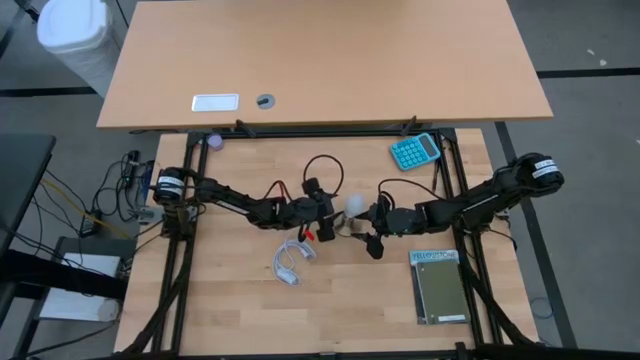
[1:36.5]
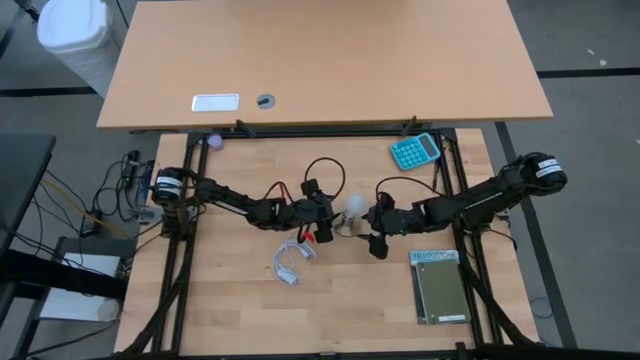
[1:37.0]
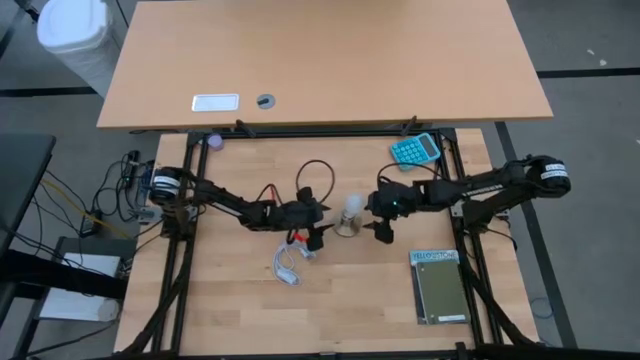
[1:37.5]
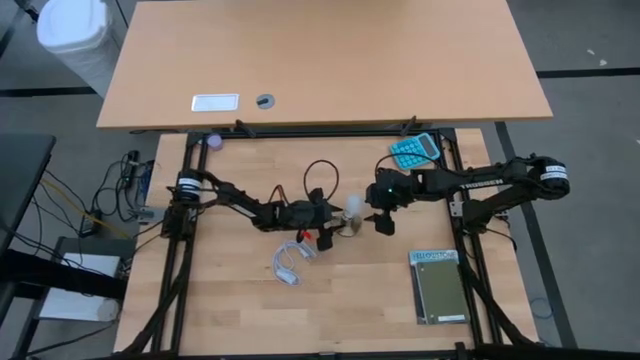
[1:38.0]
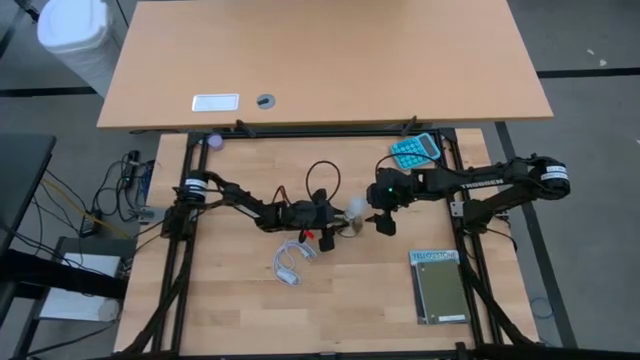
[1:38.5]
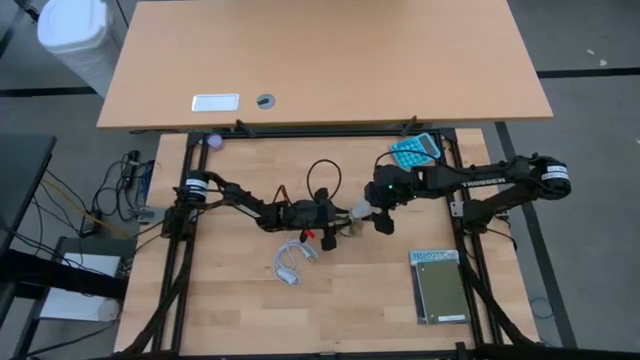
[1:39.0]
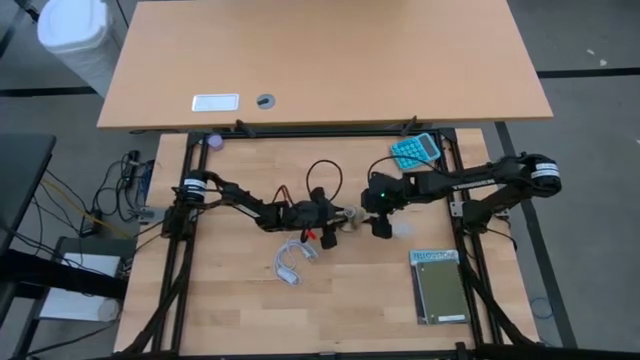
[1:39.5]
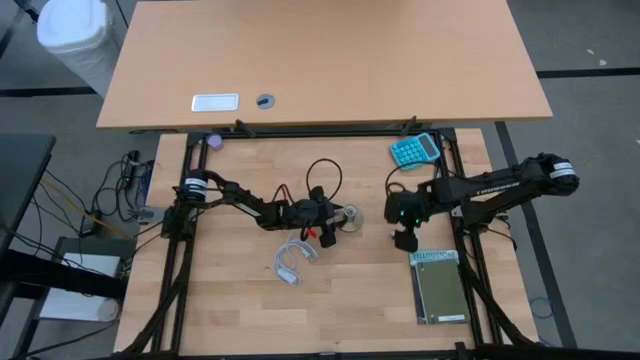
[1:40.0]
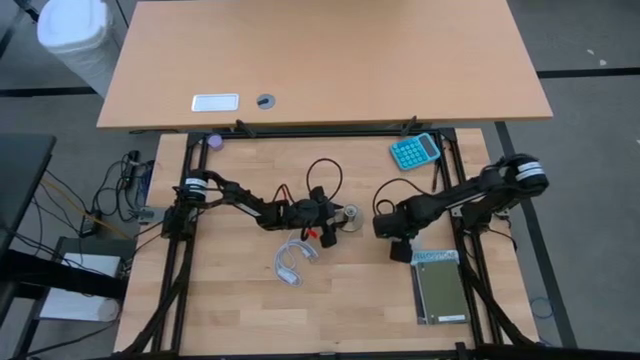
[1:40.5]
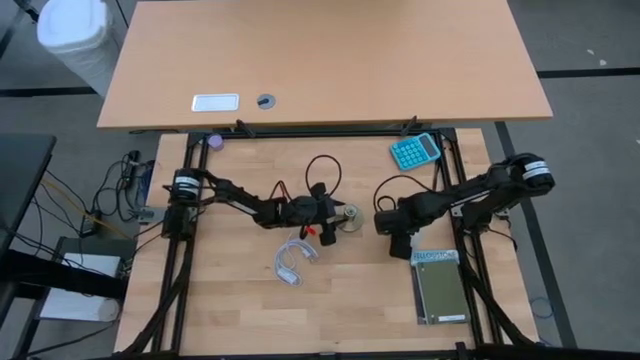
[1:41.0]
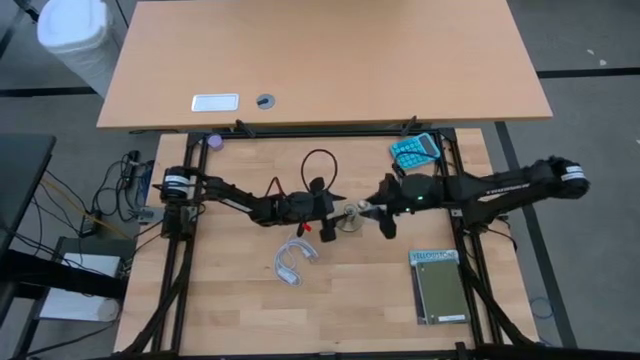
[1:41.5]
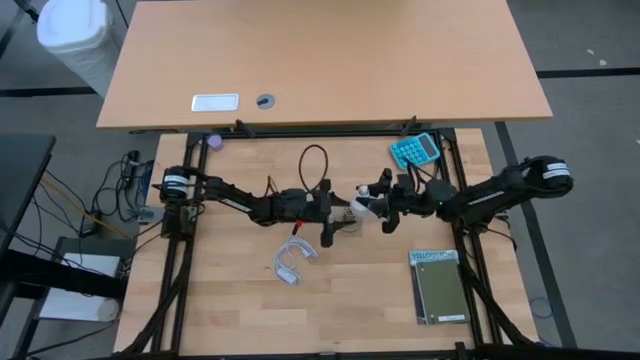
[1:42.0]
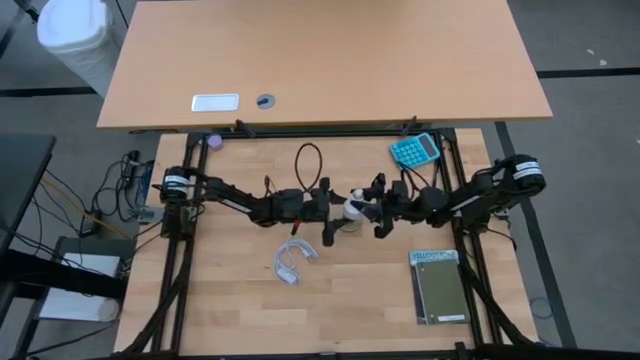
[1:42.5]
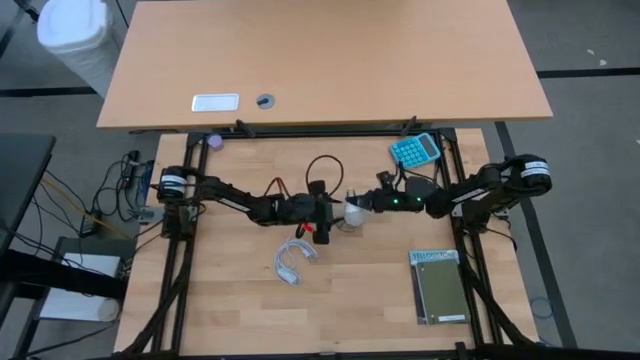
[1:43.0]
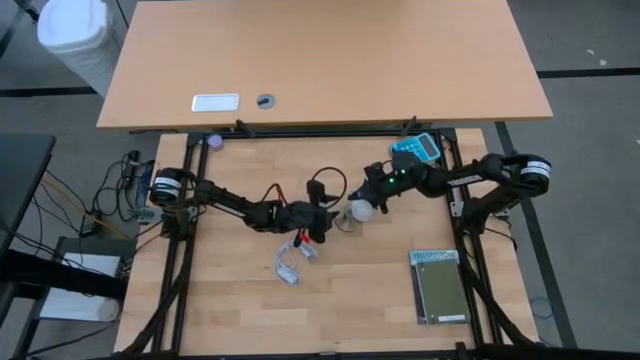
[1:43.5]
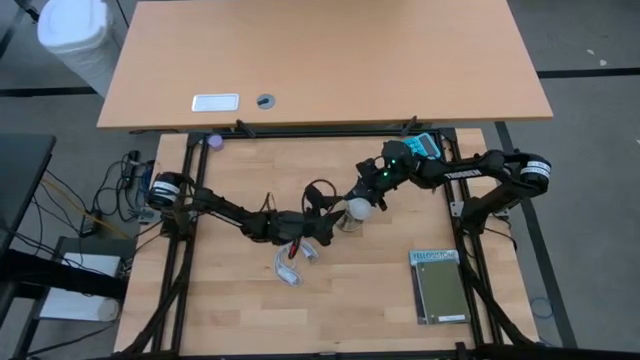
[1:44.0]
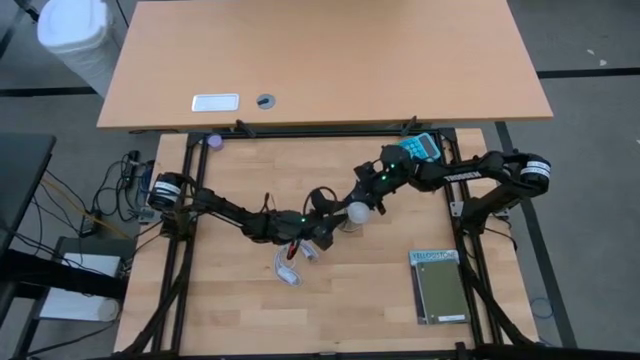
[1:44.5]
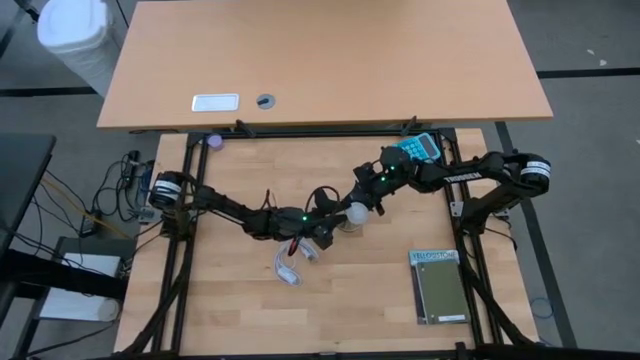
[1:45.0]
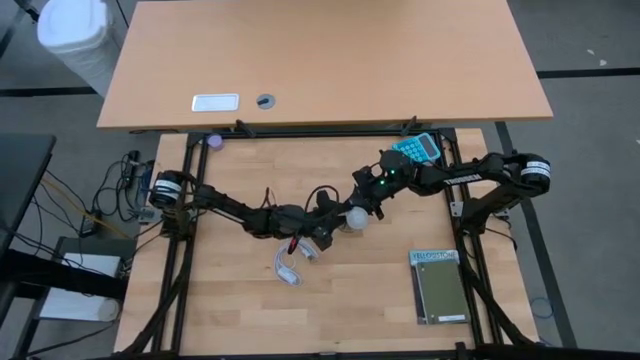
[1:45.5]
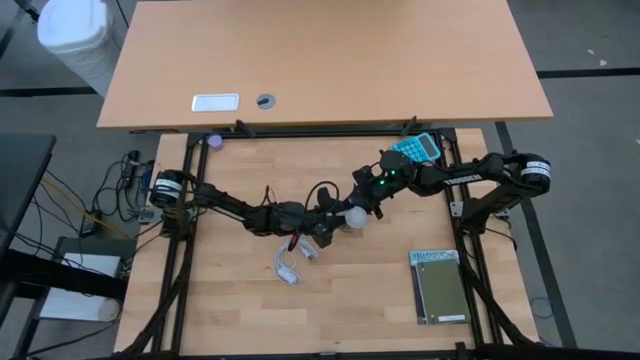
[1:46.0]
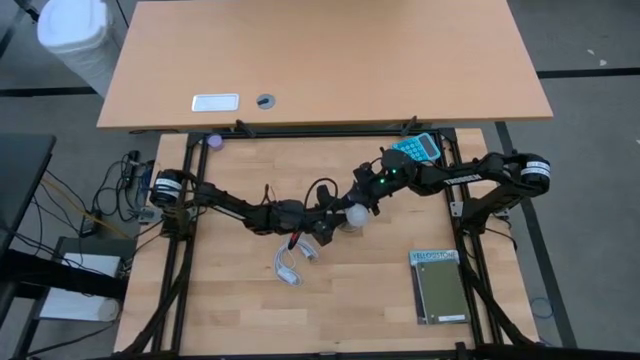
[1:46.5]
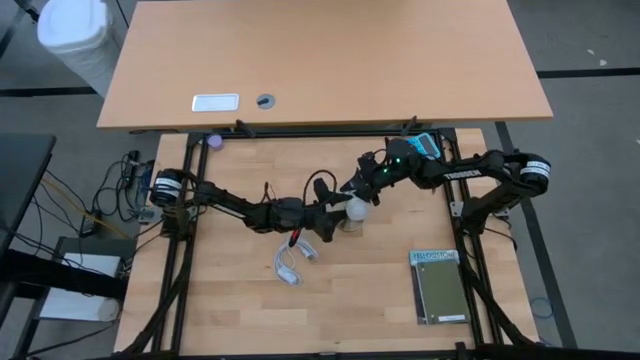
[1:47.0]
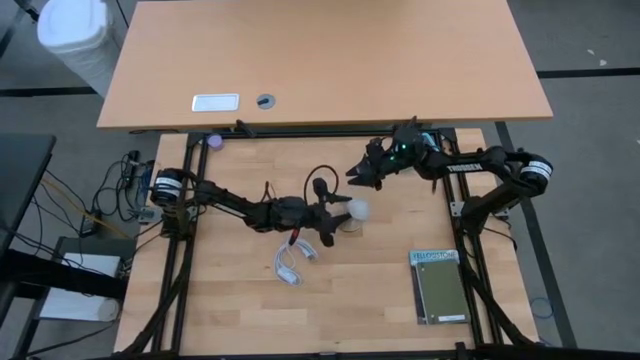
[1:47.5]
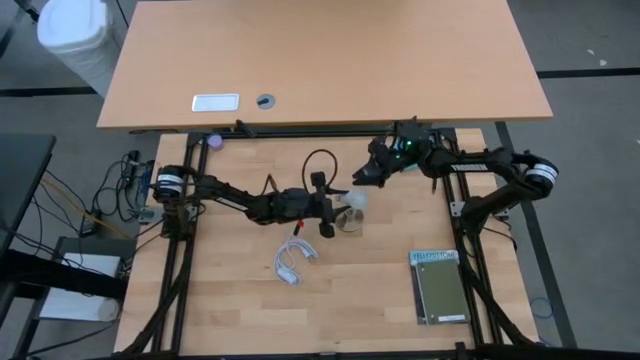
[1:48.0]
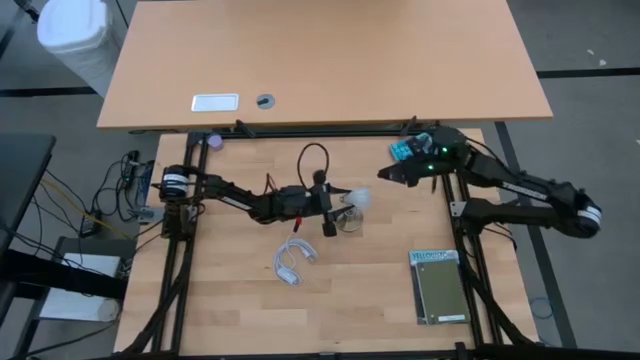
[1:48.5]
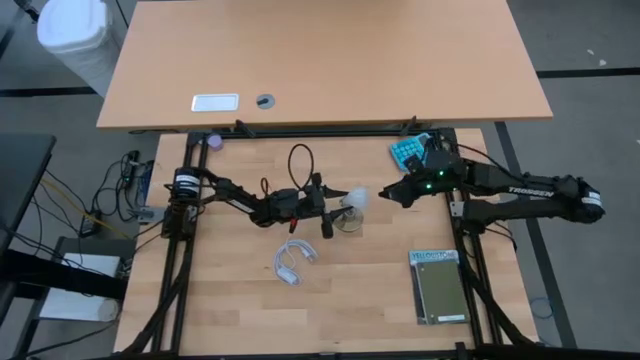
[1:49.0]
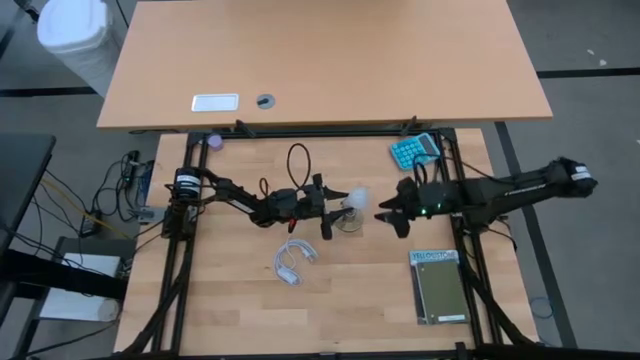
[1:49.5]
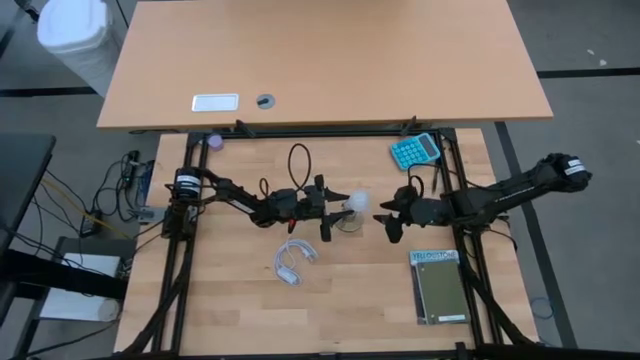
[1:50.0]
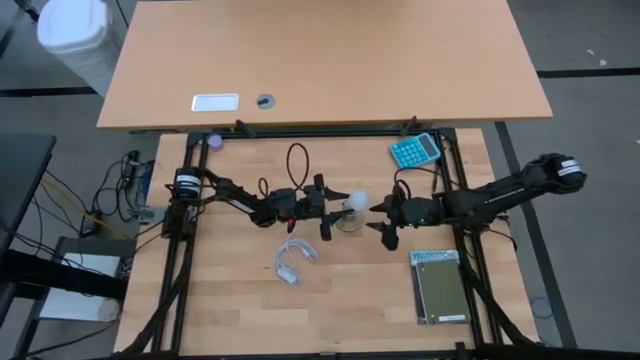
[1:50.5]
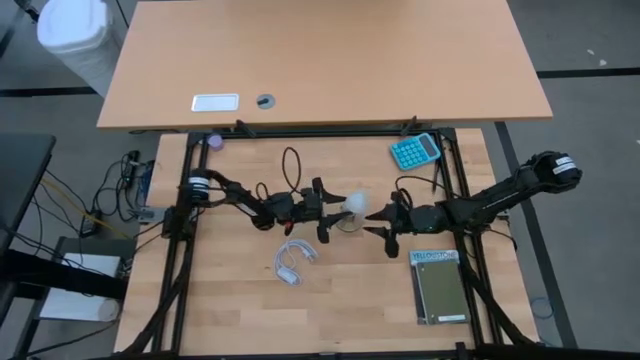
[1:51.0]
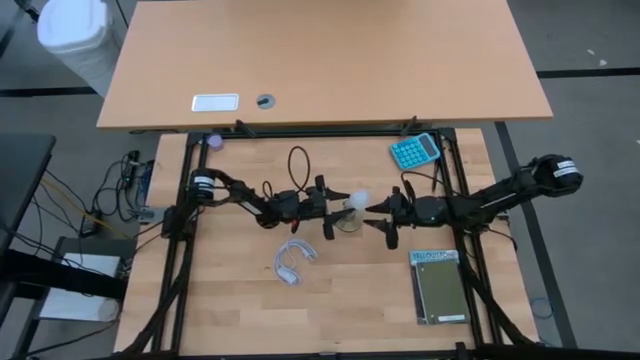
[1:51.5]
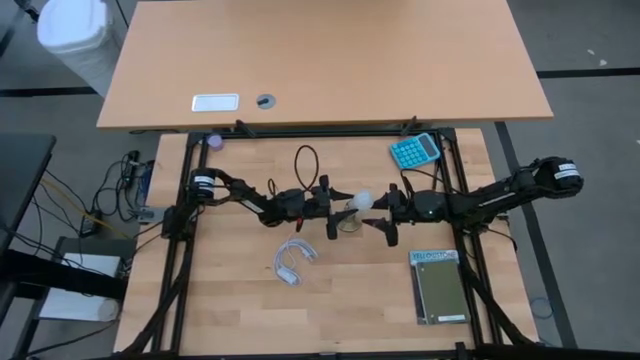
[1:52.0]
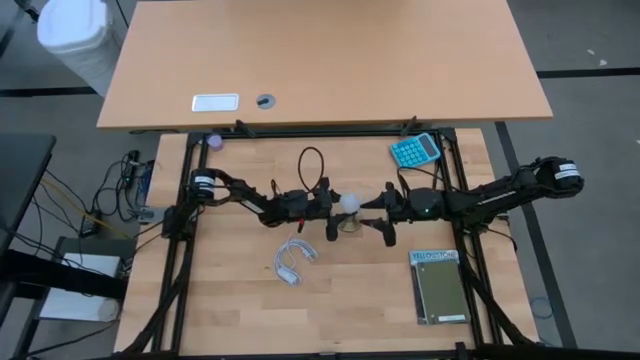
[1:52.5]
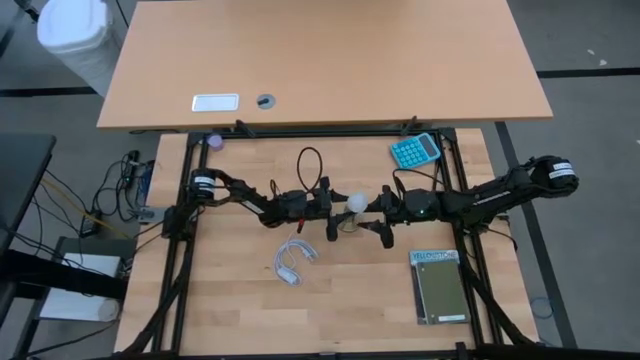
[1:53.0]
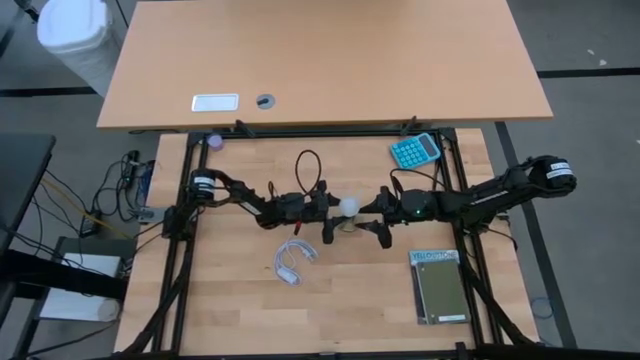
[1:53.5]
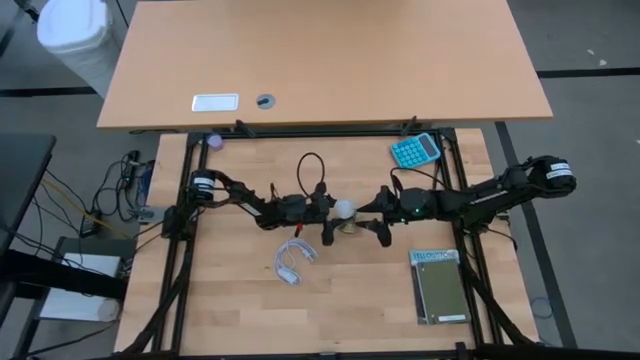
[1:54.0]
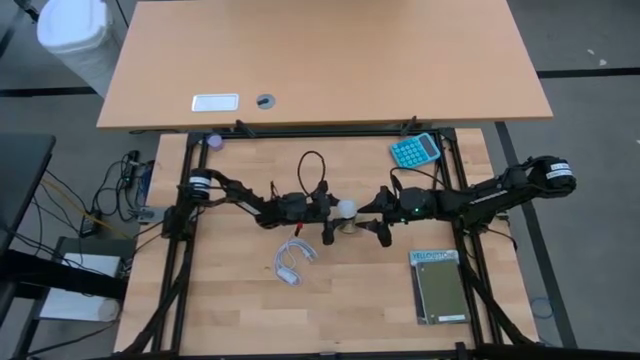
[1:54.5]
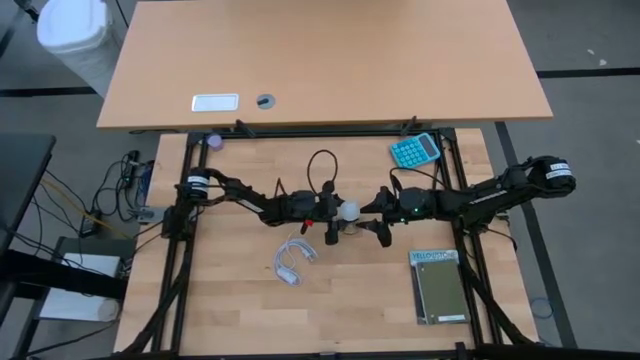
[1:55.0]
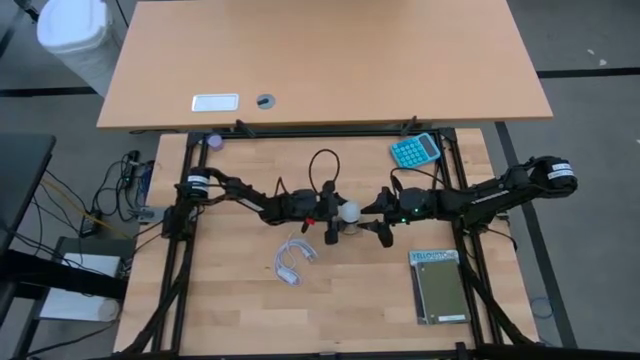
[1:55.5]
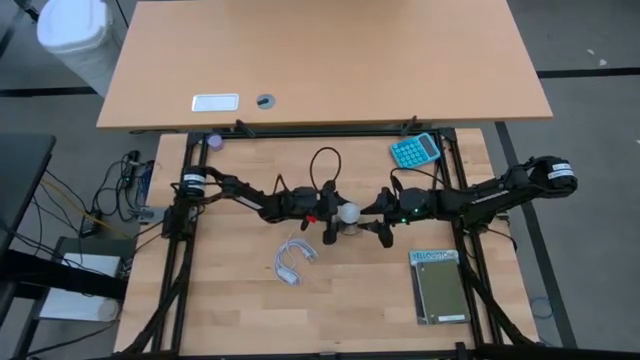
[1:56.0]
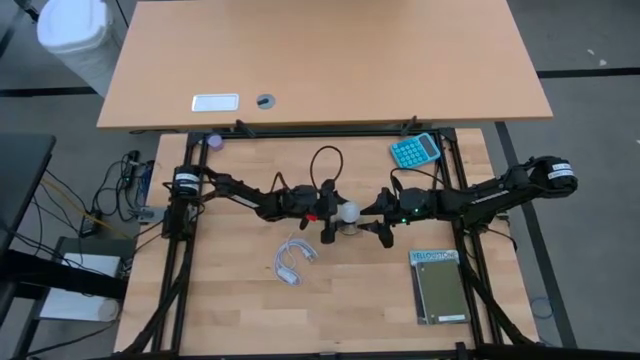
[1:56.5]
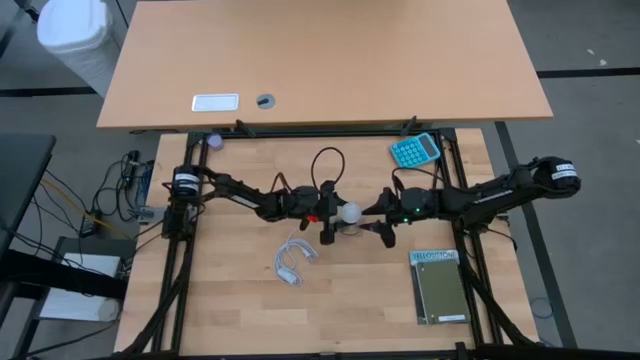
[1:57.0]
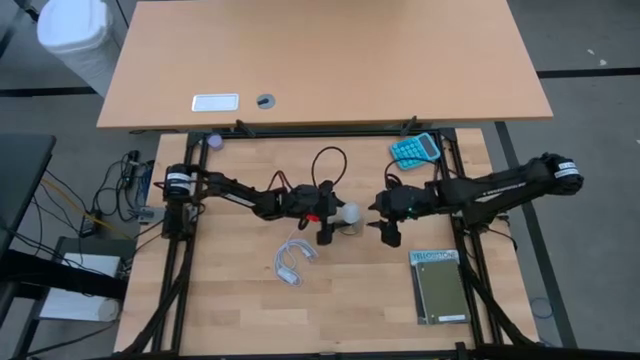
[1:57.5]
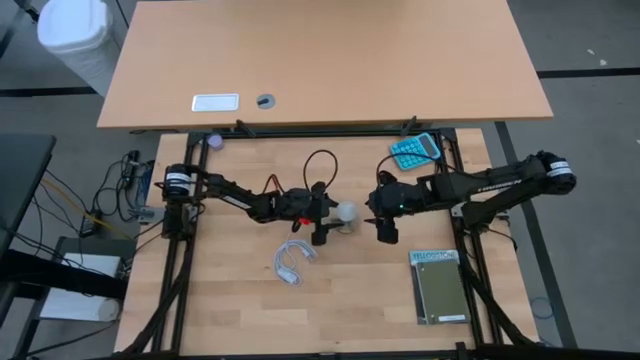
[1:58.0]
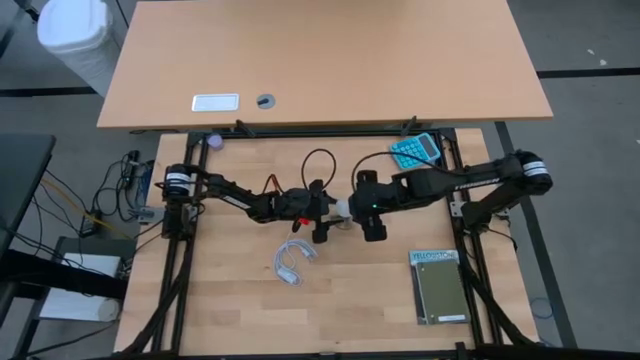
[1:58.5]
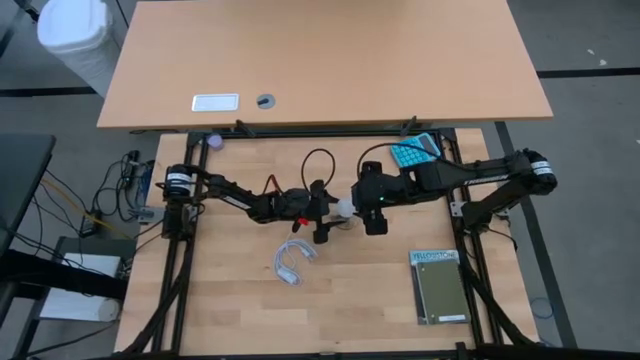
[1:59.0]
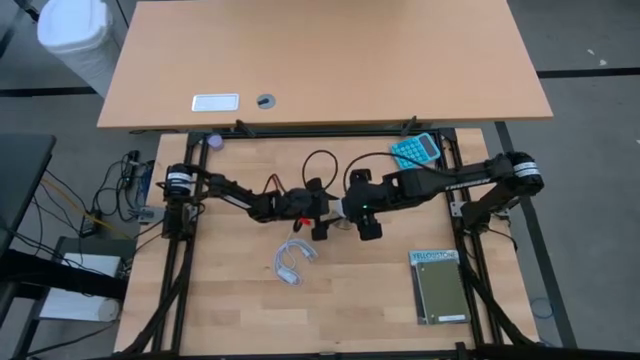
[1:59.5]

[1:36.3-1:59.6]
Task: Screw lightbulb
Insert the lightbulb into the socket
